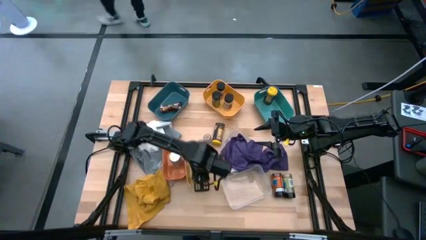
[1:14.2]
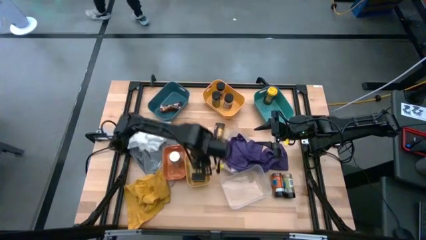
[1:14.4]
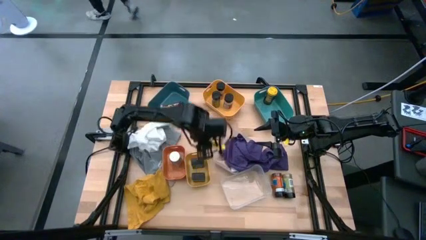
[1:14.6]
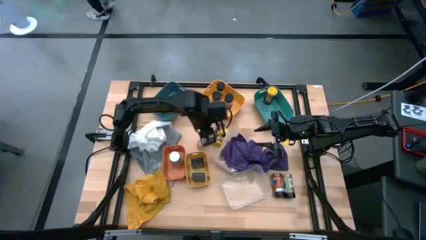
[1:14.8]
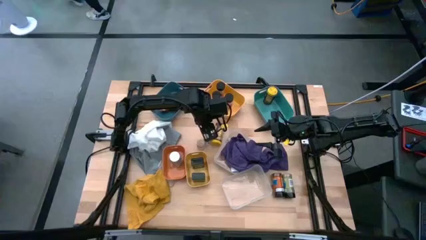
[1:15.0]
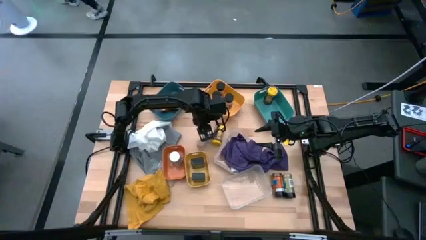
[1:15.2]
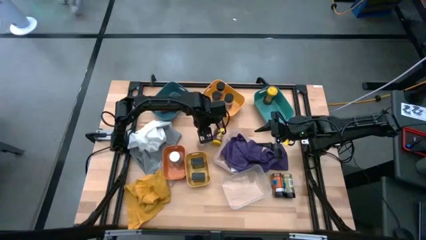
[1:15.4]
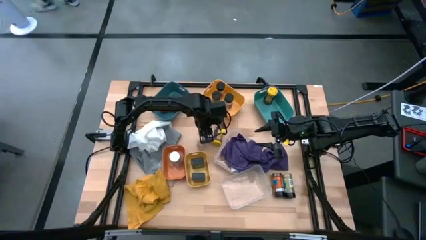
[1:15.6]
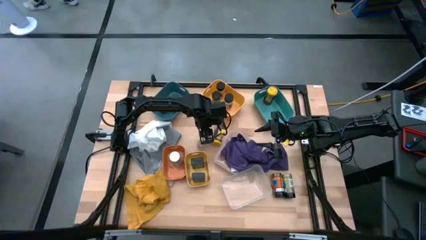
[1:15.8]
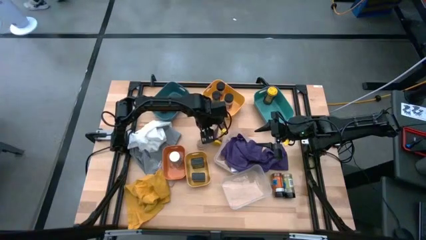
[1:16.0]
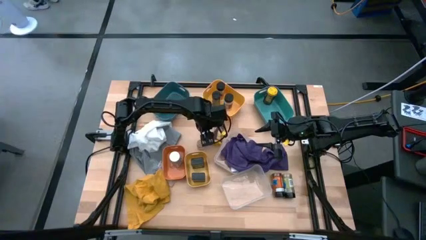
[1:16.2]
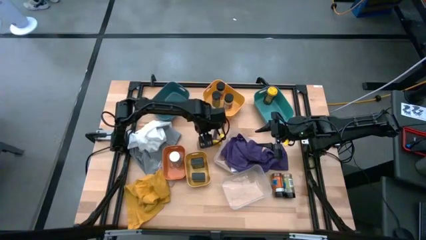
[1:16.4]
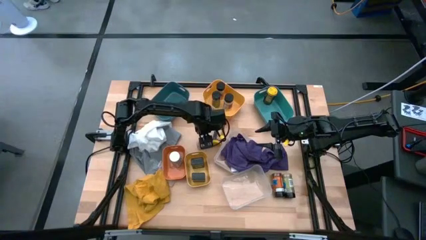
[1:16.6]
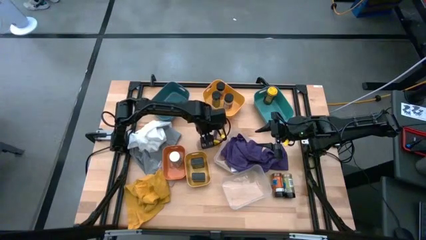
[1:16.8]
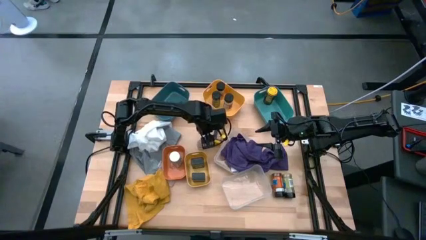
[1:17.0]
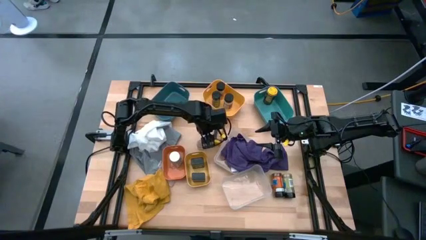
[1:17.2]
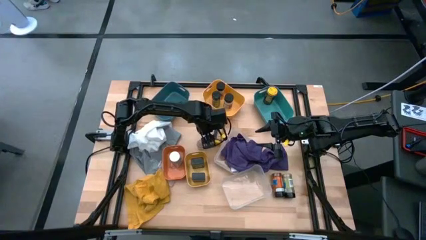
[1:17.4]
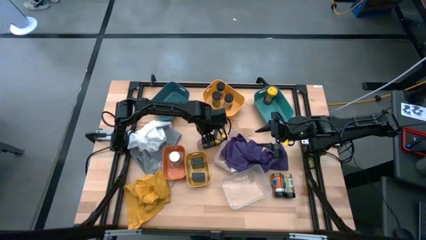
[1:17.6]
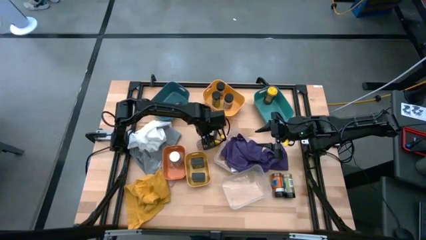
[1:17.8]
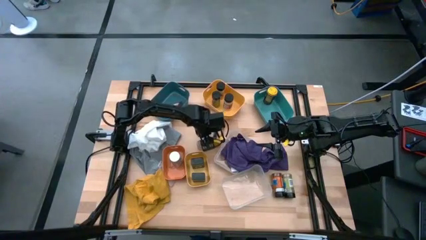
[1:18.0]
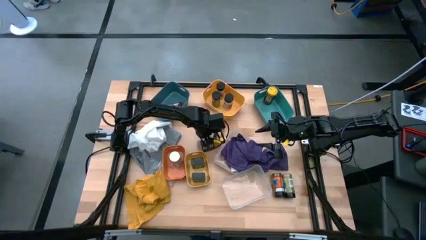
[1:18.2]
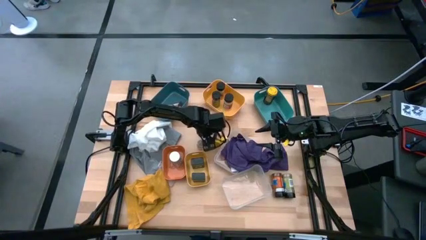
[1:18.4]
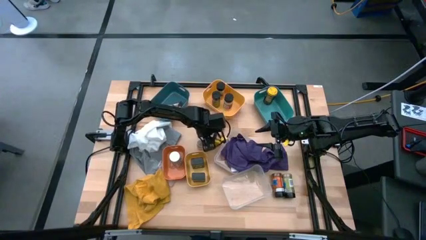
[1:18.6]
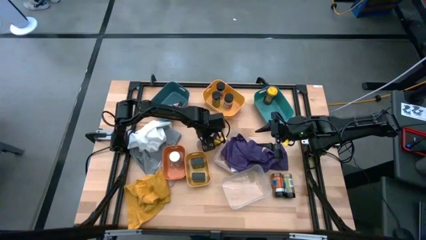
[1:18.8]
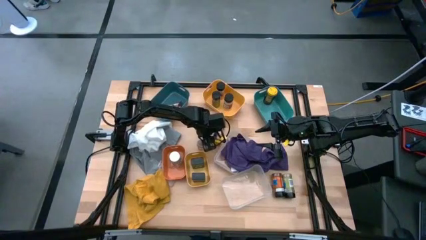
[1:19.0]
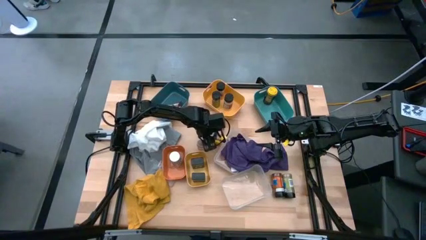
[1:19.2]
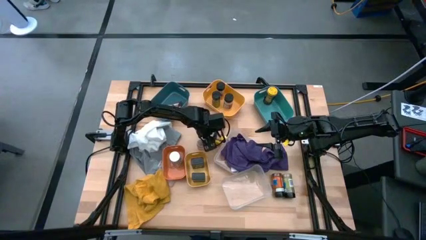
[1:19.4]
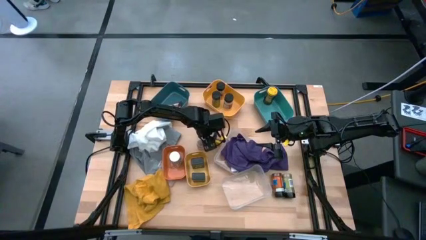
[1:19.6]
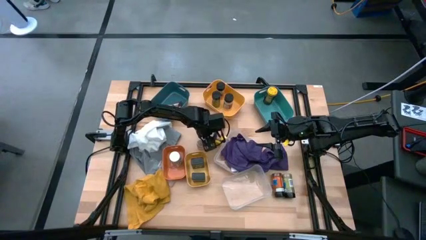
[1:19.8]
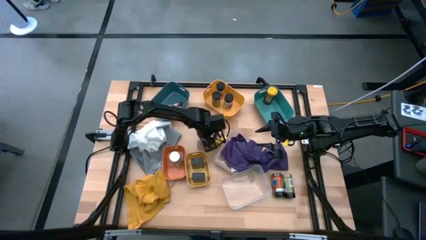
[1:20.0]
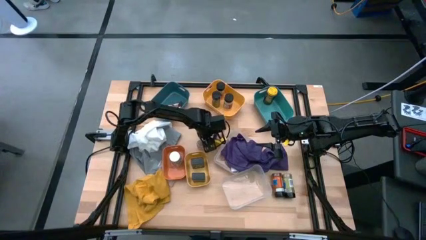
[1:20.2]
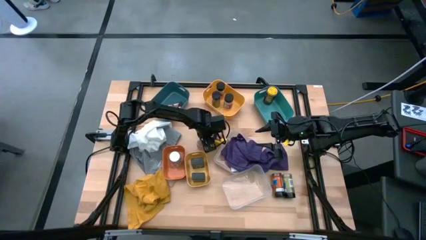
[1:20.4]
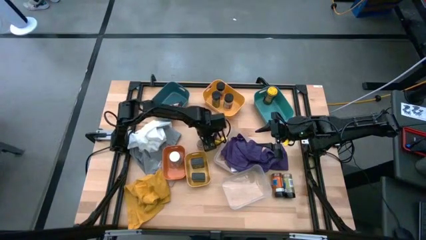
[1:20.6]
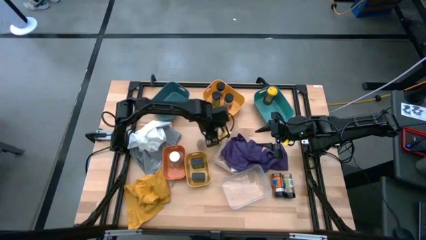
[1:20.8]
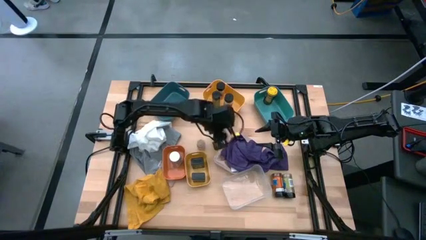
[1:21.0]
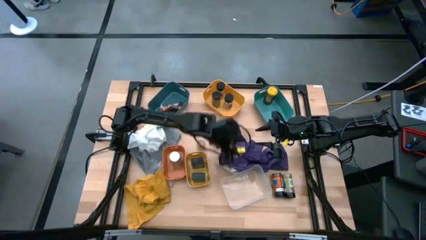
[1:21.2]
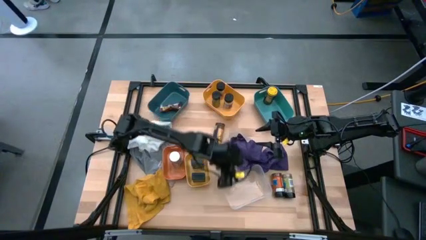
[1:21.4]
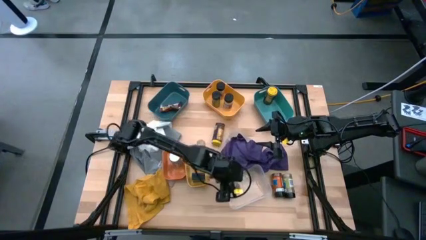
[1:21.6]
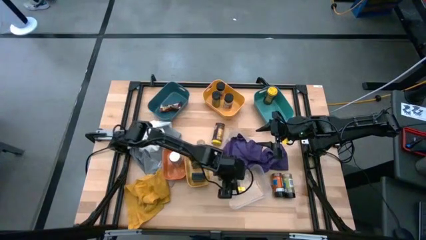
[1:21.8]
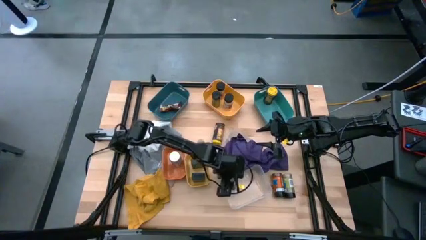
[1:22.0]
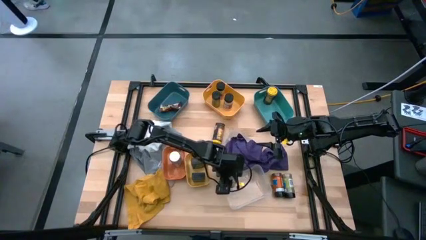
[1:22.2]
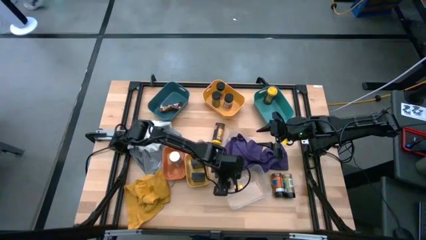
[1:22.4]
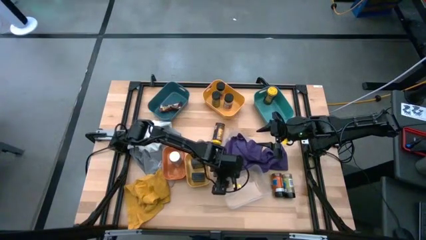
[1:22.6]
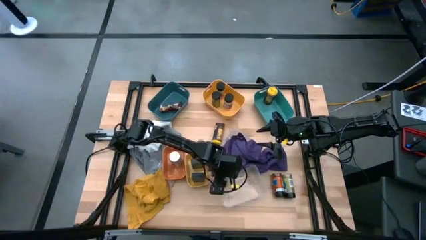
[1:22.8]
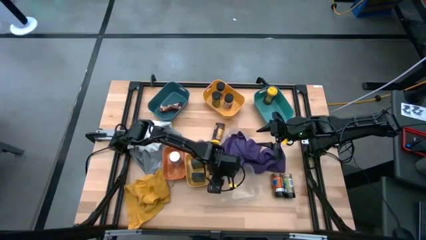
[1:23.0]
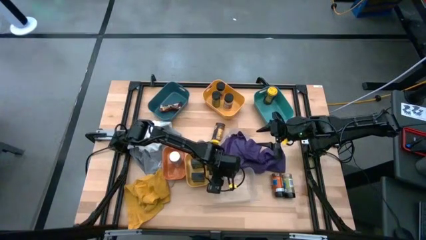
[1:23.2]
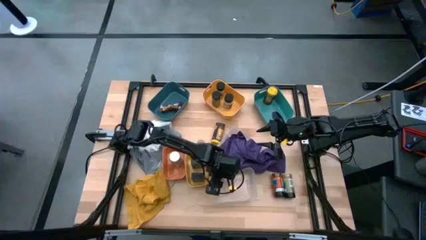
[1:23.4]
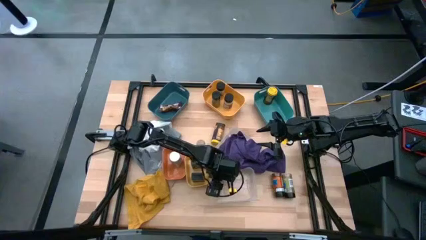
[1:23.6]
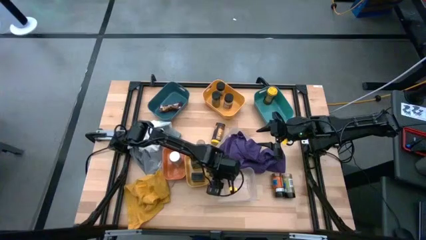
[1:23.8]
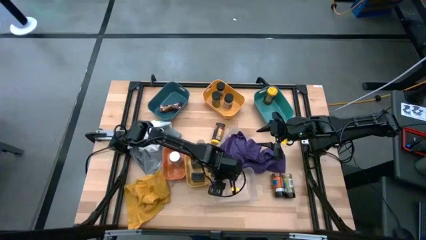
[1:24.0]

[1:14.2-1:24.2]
Task: Sort spices by type
Put the brown spice bottle into the transparent bin

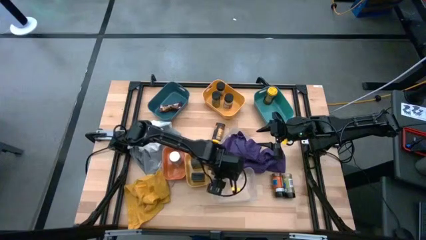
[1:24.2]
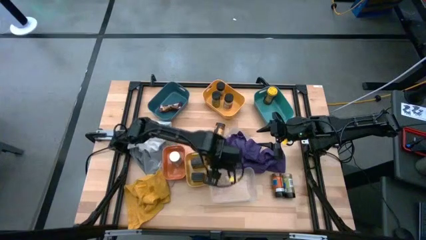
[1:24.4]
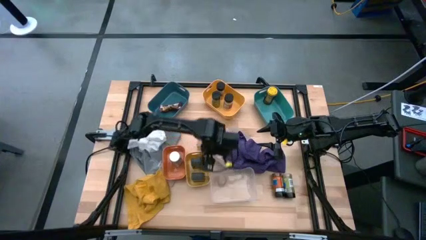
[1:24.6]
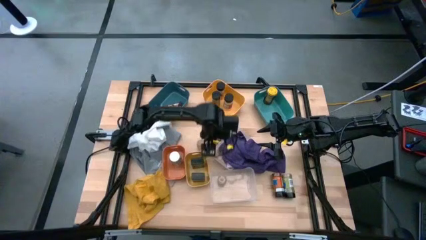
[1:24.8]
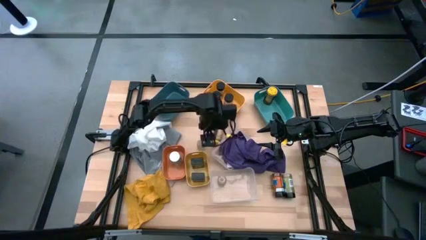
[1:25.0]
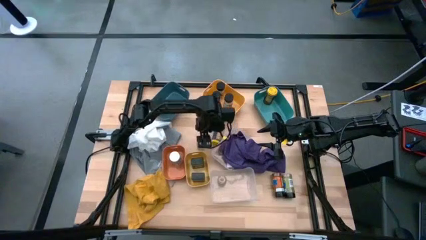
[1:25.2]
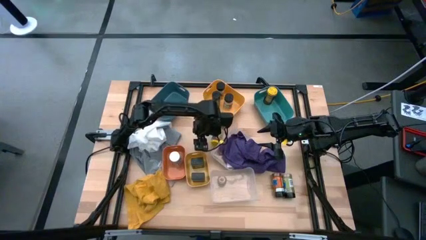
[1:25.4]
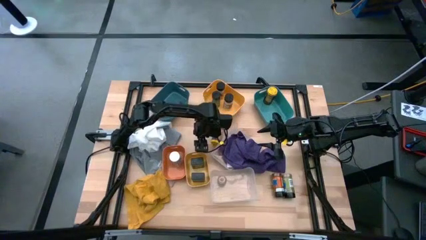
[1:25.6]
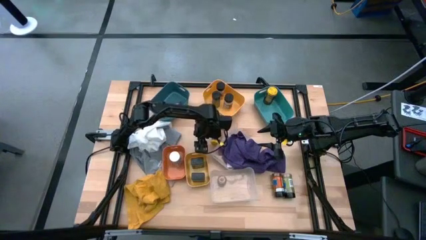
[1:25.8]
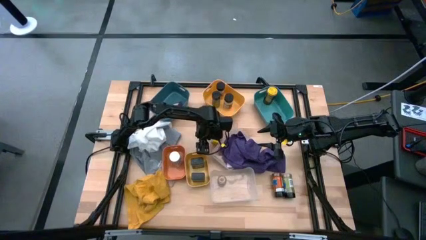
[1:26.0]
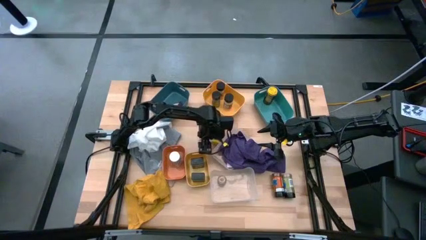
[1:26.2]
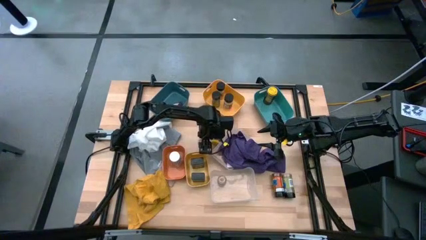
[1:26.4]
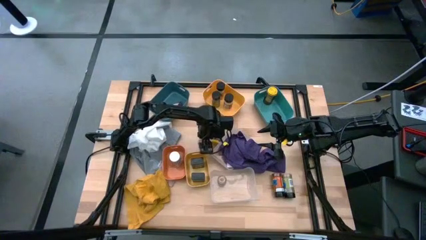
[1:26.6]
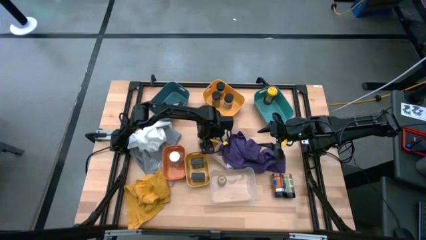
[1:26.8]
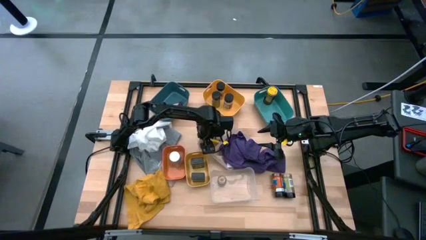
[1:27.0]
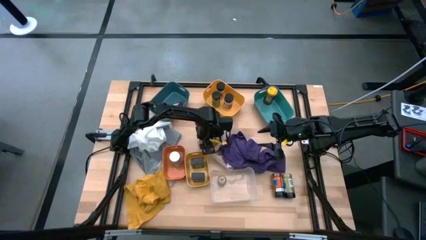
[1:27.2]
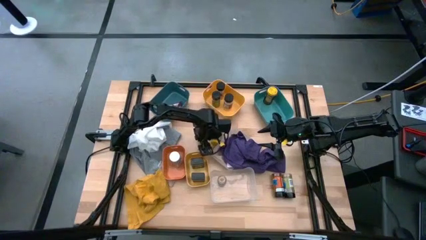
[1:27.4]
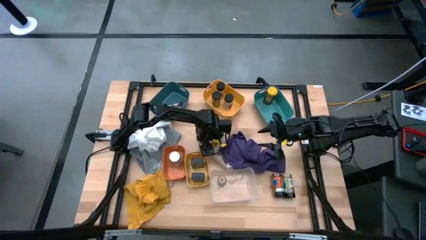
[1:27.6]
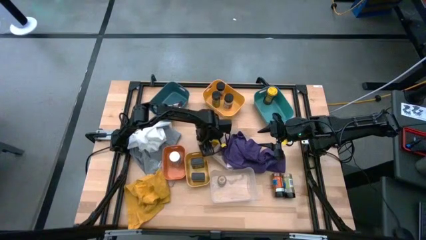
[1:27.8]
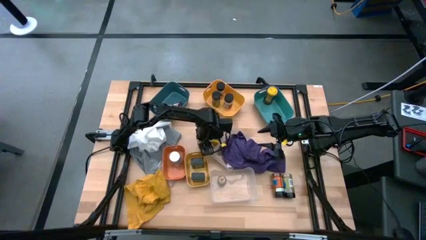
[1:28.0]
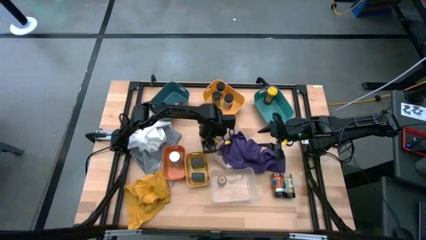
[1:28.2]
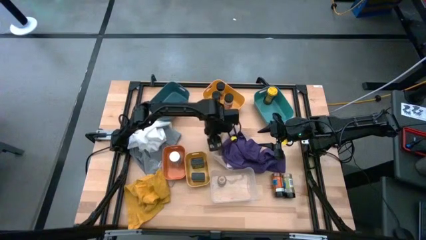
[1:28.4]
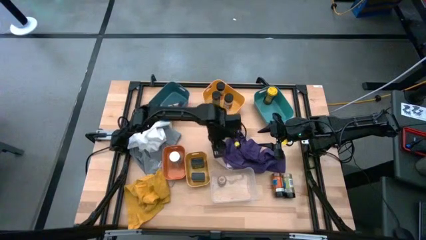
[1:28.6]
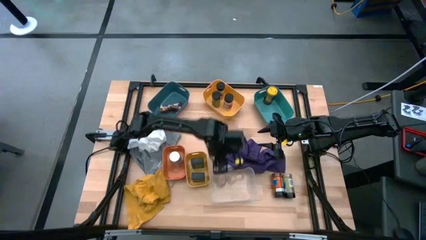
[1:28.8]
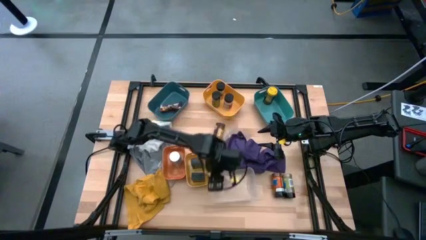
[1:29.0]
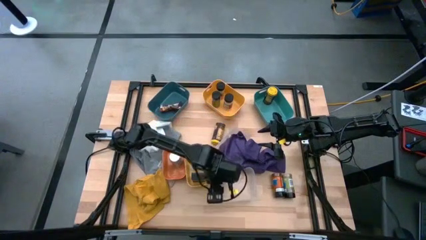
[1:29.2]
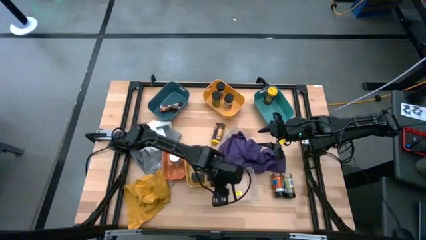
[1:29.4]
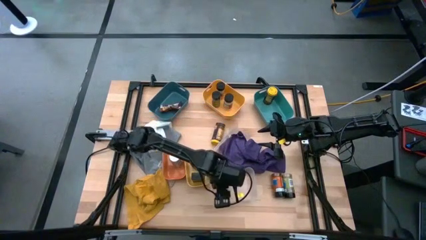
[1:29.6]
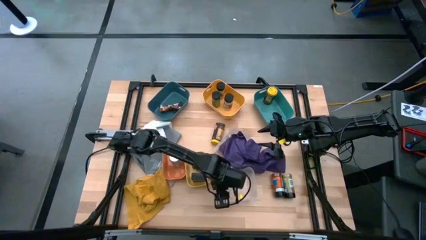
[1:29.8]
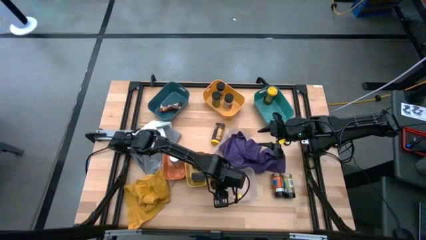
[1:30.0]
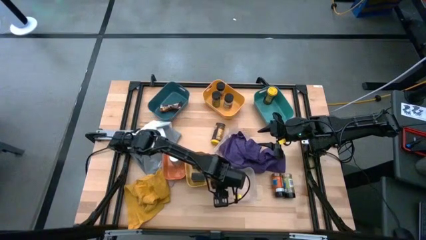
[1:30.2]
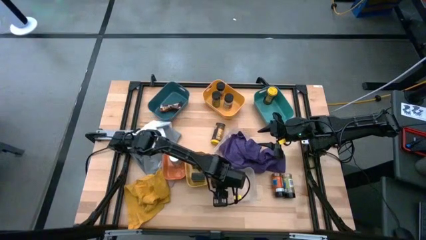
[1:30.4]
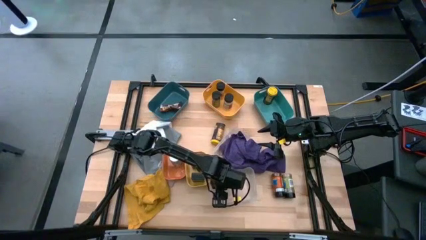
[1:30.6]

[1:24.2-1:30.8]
Put the brown spice bottle into the transparent bin
